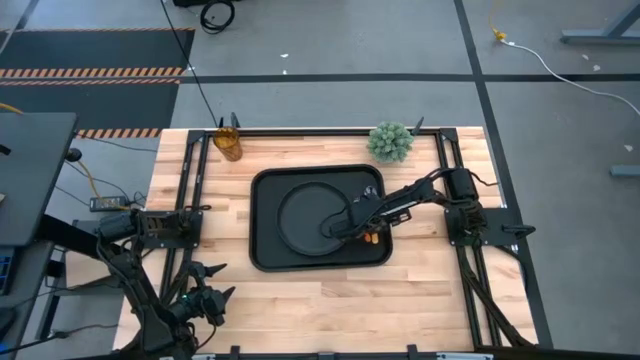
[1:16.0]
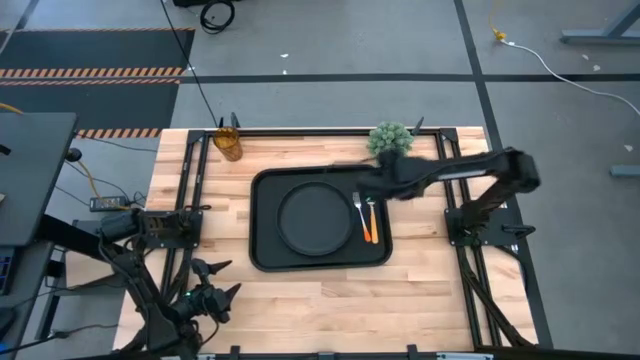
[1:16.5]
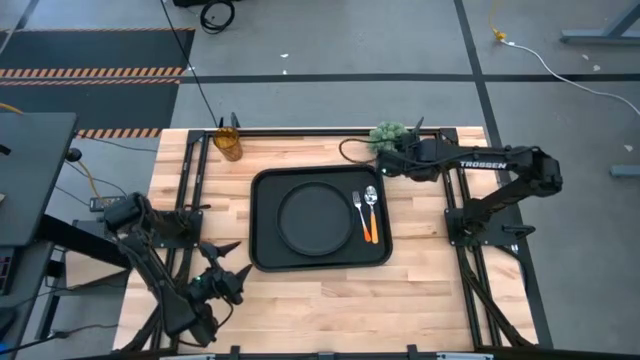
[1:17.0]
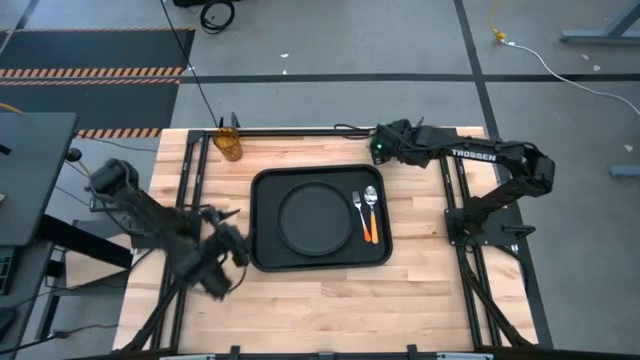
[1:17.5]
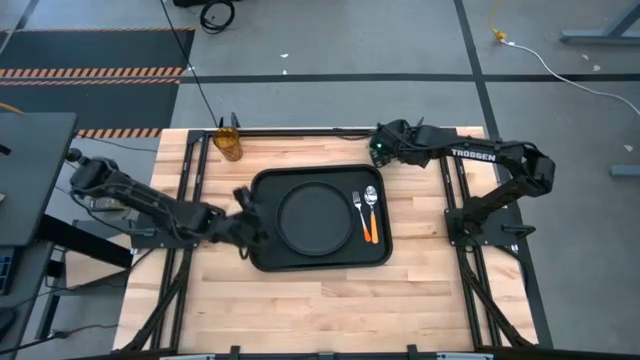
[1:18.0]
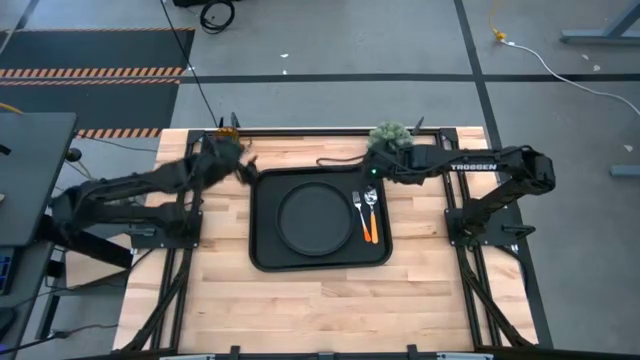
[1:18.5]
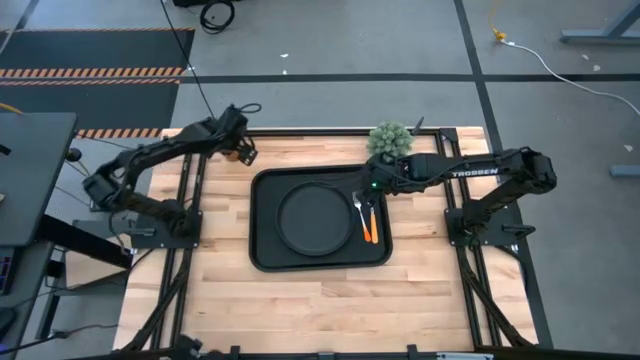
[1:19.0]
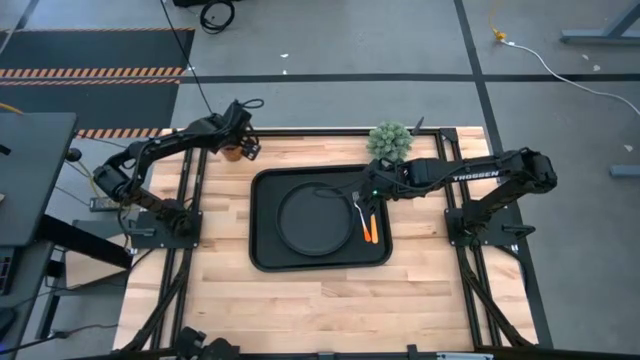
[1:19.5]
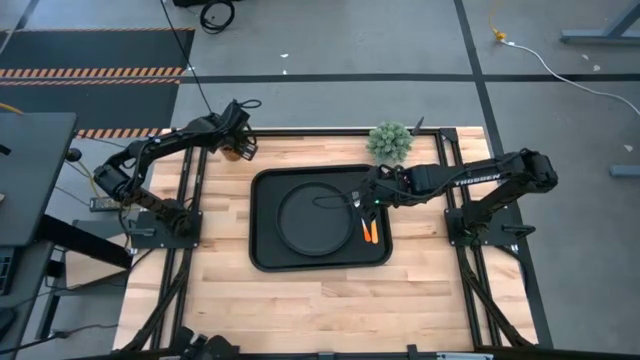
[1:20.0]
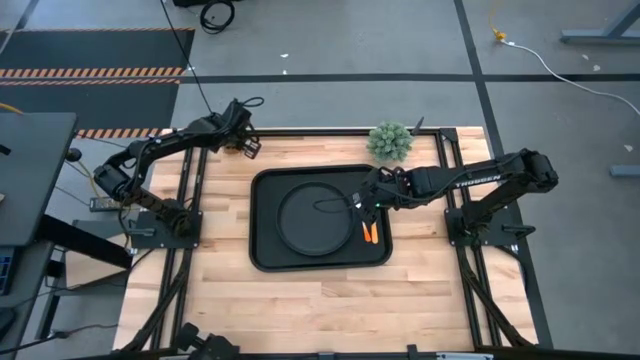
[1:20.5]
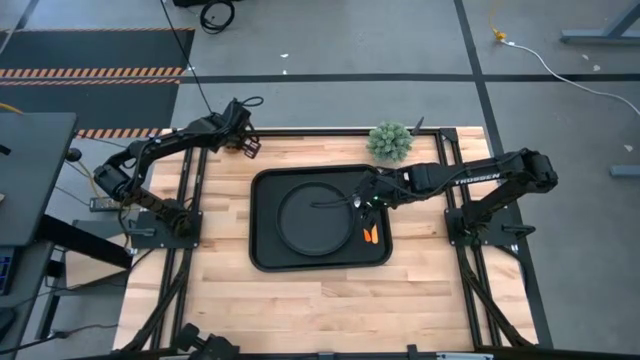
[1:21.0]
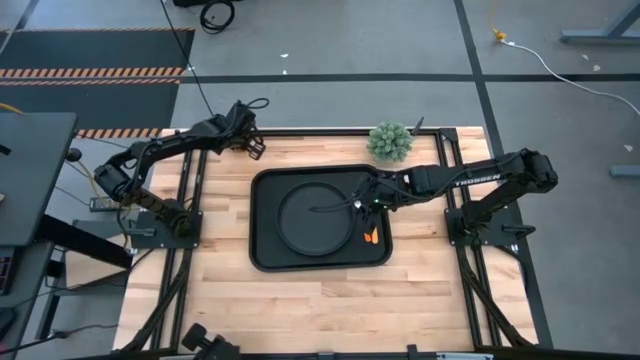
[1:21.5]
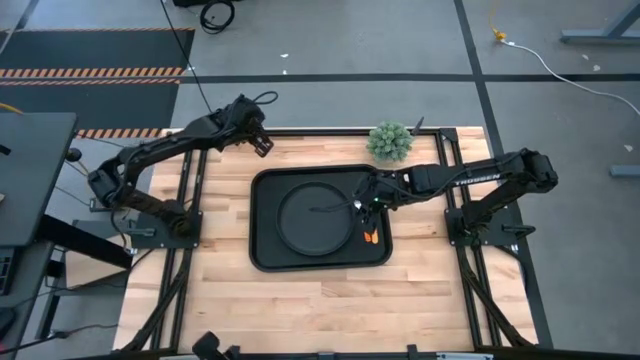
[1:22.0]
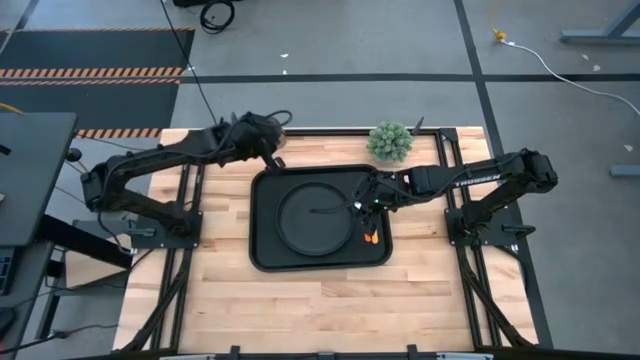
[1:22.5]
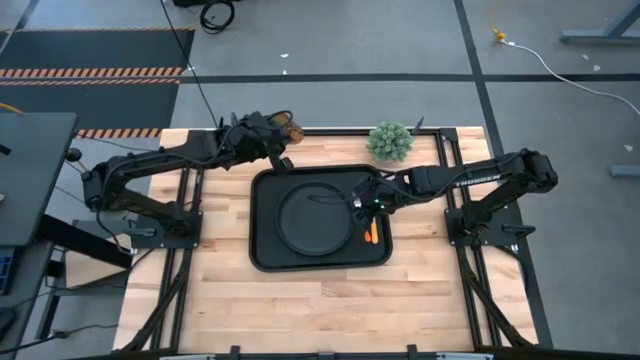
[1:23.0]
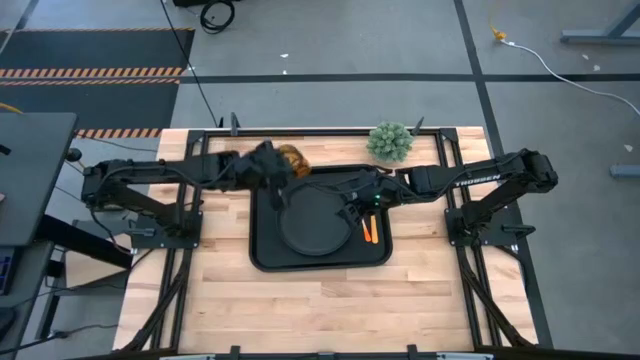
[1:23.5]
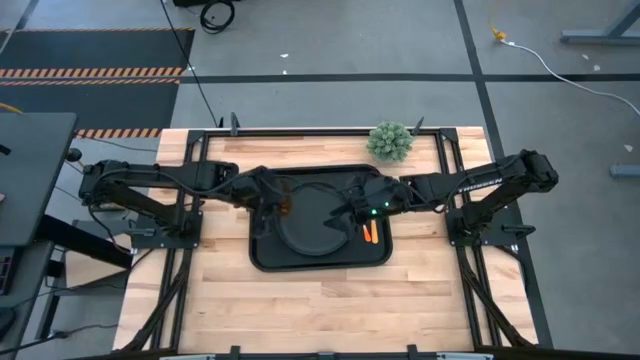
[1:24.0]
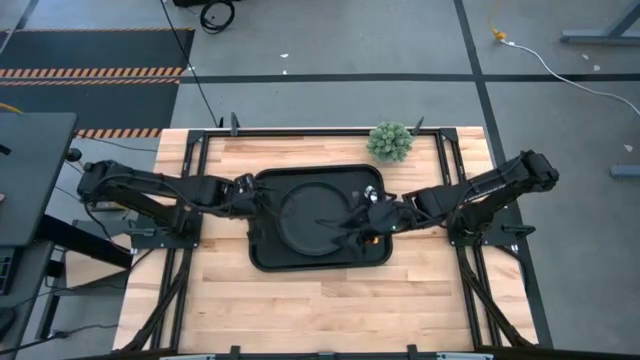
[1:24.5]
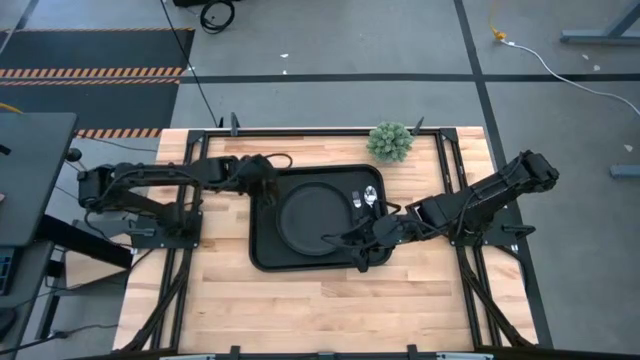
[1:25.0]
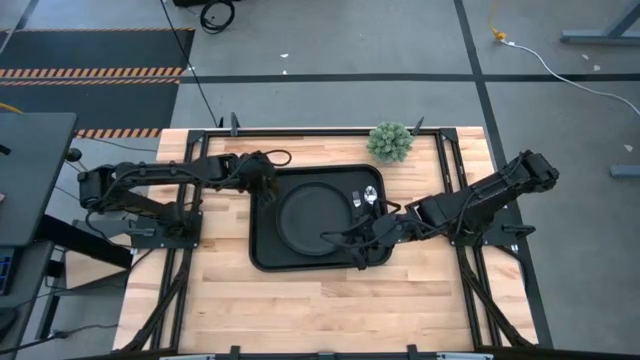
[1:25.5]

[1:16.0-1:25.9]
Task: Pick and place plate/cup/fork/spoon on tray
Put the brown glass on the black serving tray to the top left of the black plate

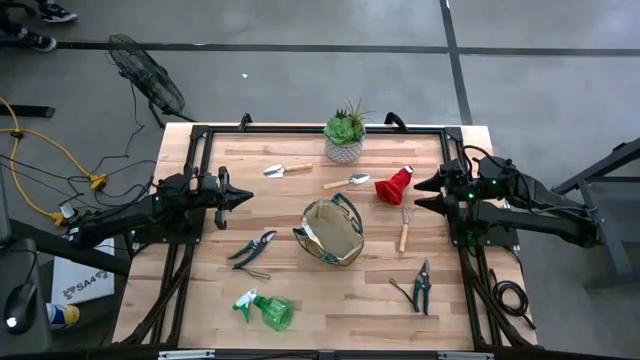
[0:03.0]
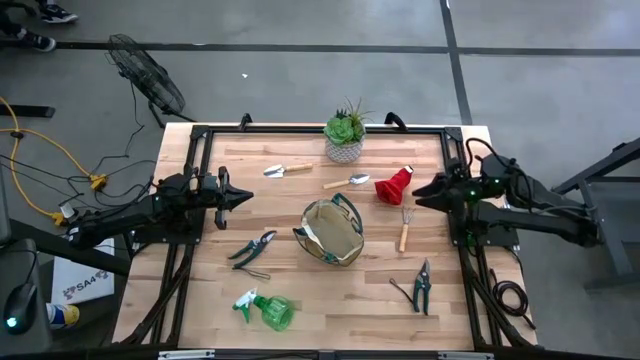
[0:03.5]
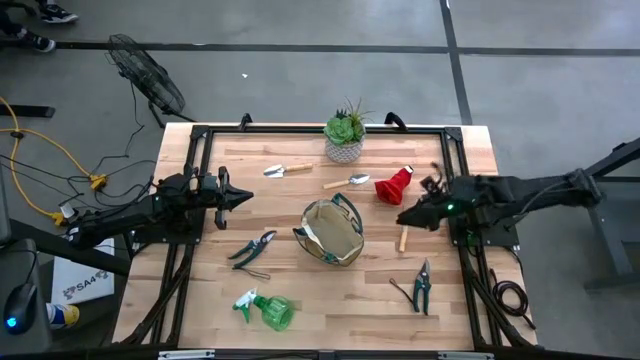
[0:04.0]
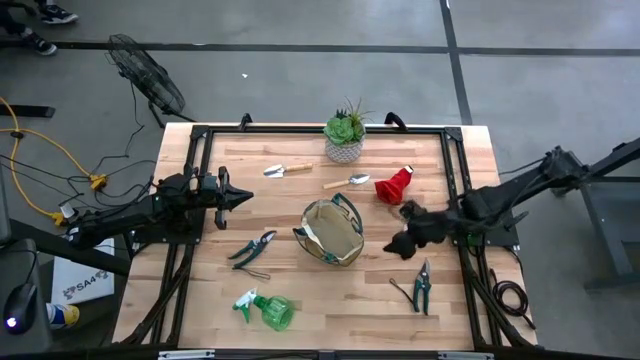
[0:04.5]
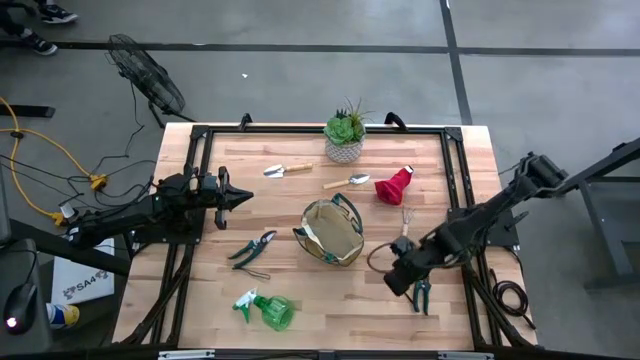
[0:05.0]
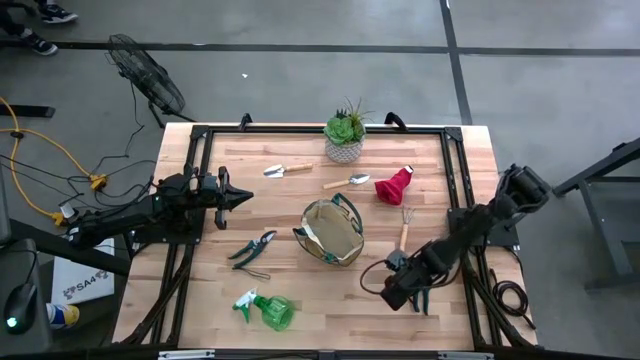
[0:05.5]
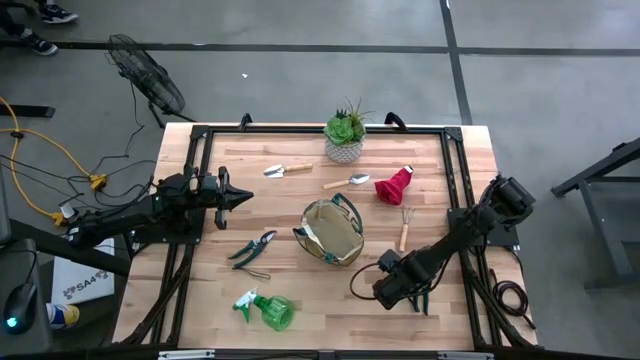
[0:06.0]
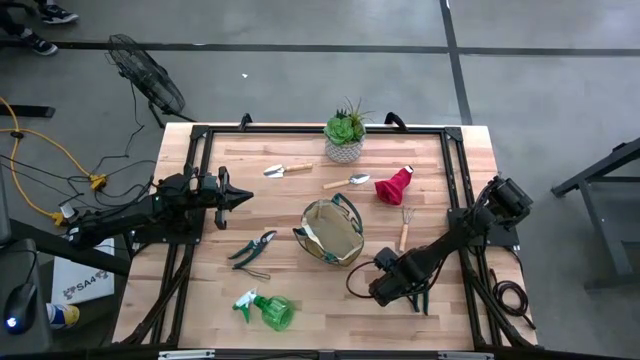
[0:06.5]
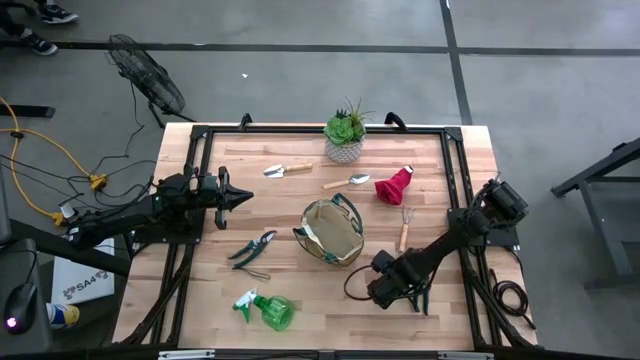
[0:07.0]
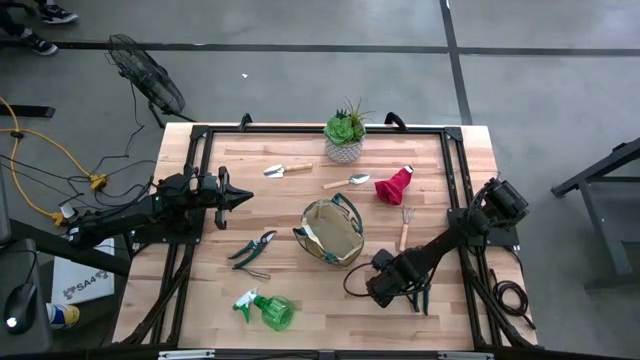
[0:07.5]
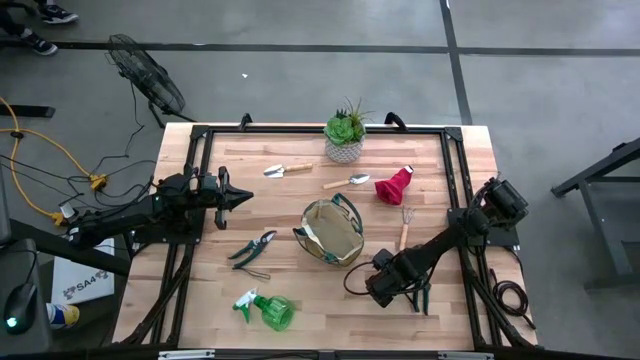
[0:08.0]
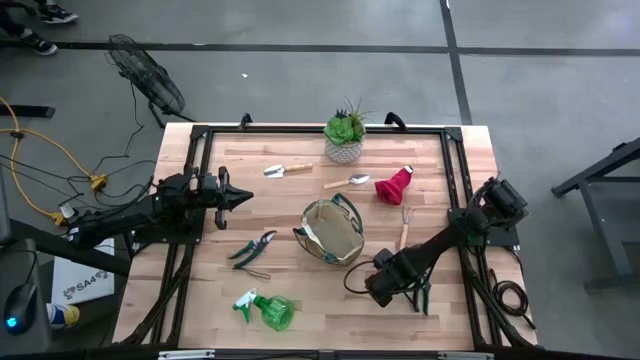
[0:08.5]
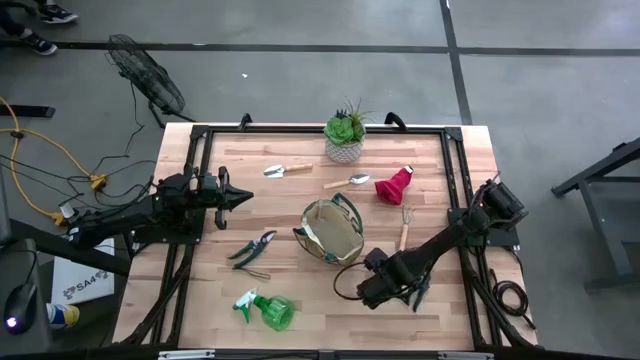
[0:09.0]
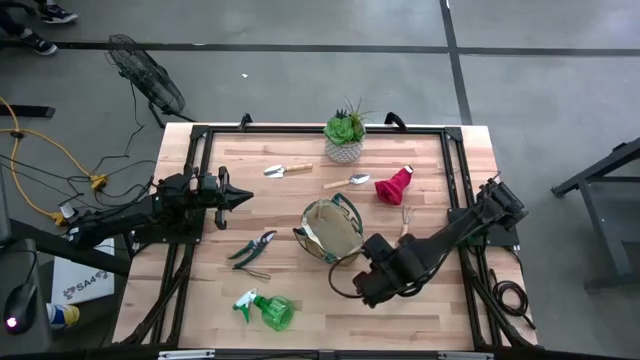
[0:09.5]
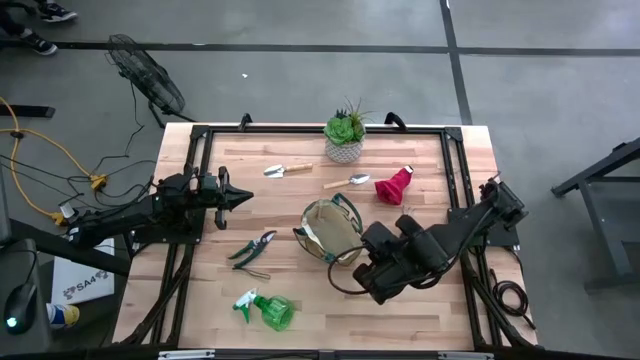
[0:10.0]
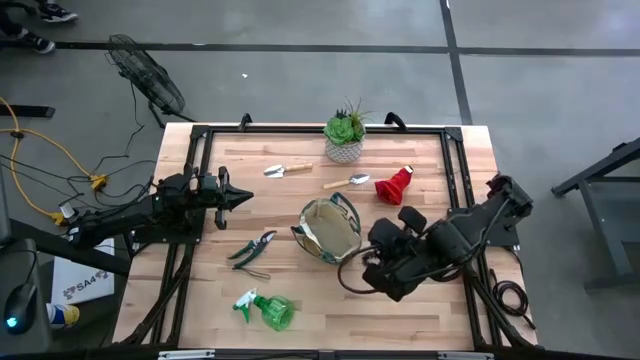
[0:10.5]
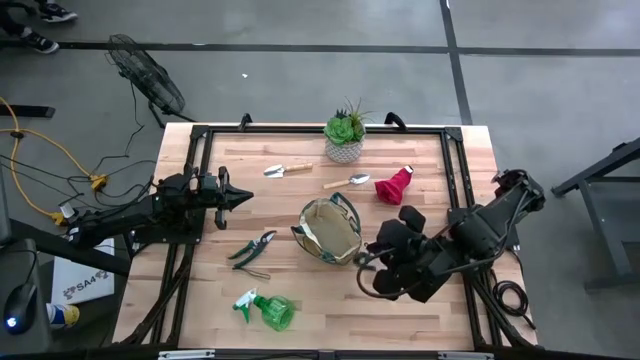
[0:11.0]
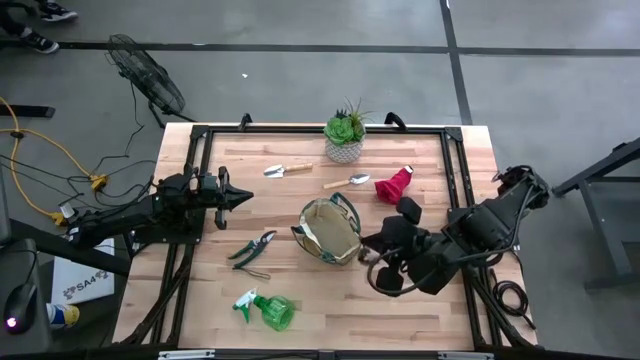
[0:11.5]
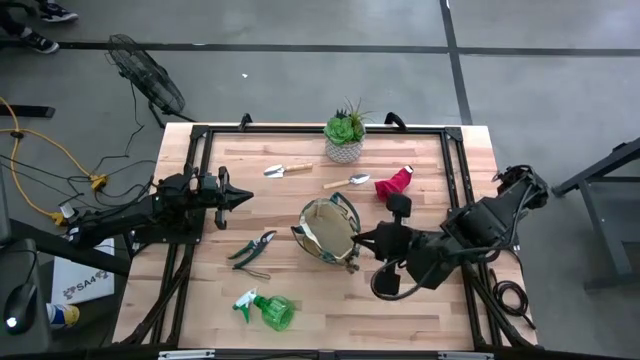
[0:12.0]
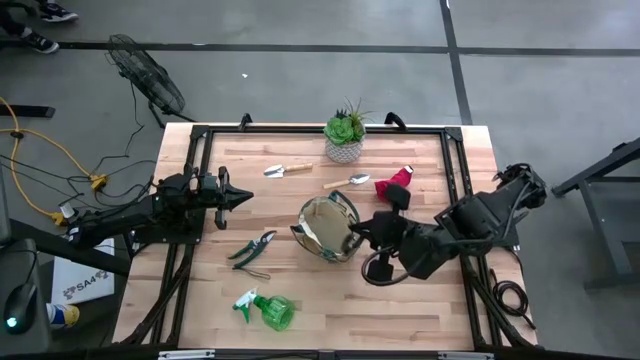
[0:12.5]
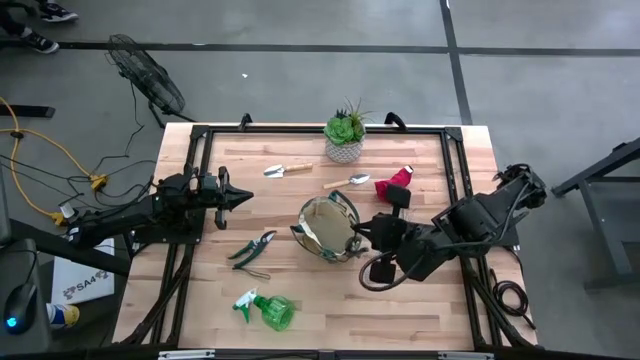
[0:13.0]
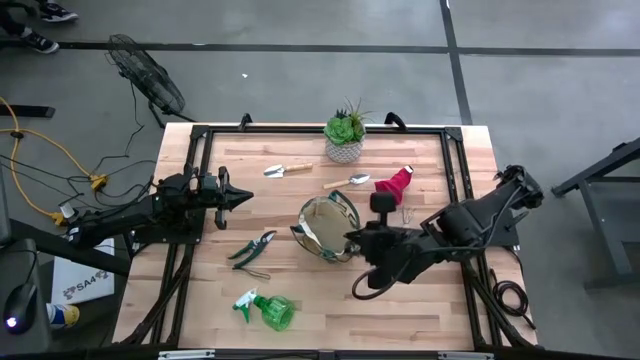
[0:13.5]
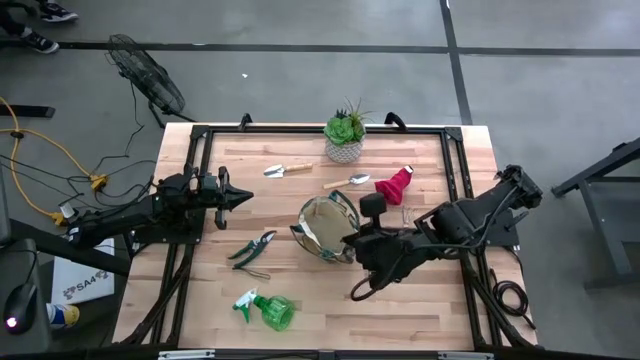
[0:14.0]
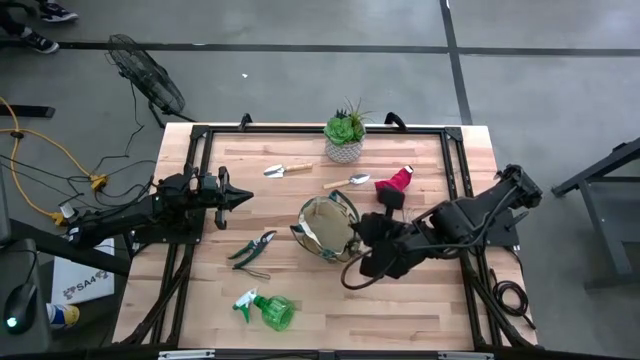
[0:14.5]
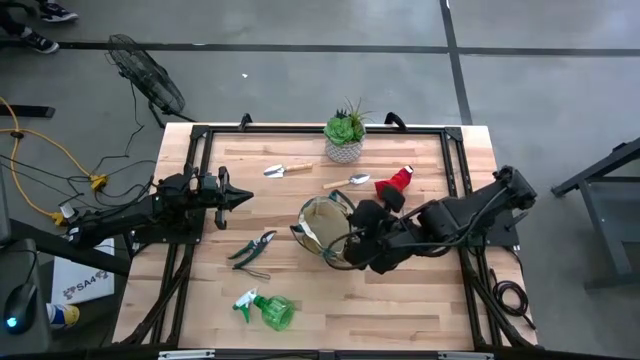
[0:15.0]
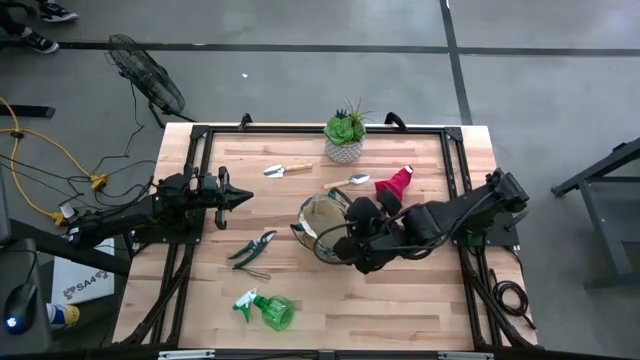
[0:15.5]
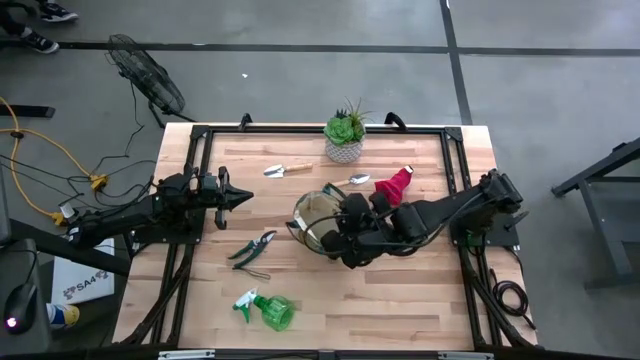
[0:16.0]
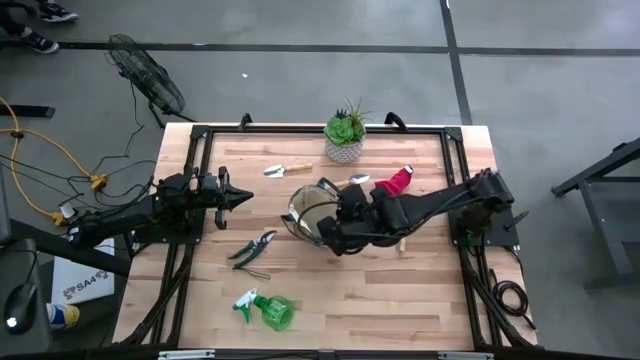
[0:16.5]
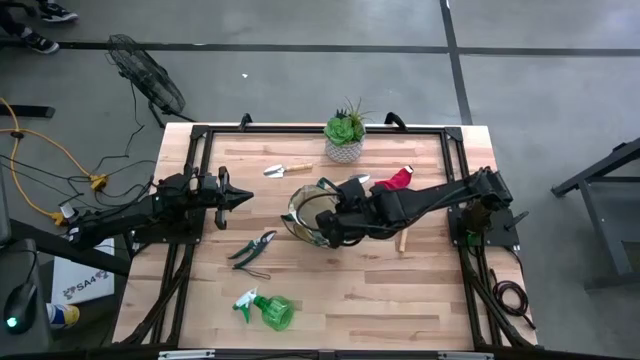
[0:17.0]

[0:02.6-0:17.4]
Task: Pick & Place Garden tools in Gardening bag
Put the right green shear scissors into the brown gardening bag
